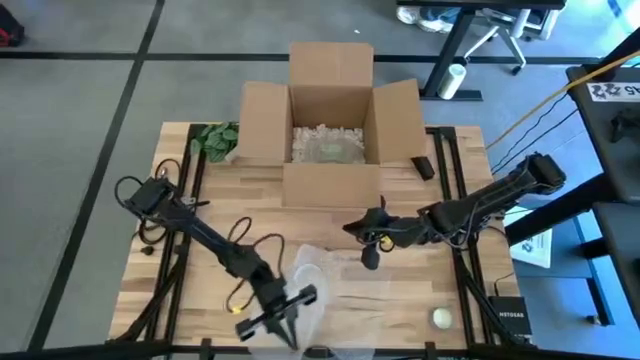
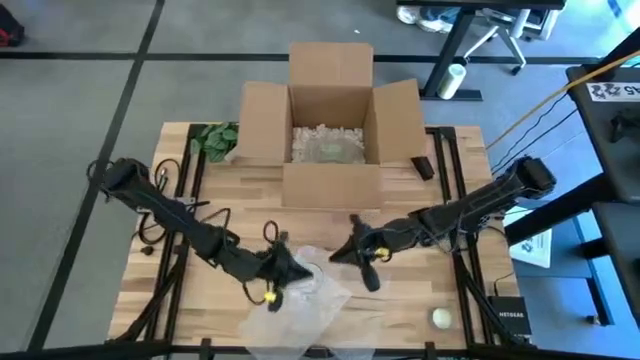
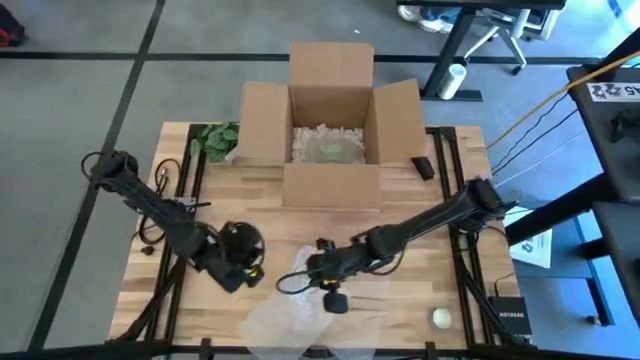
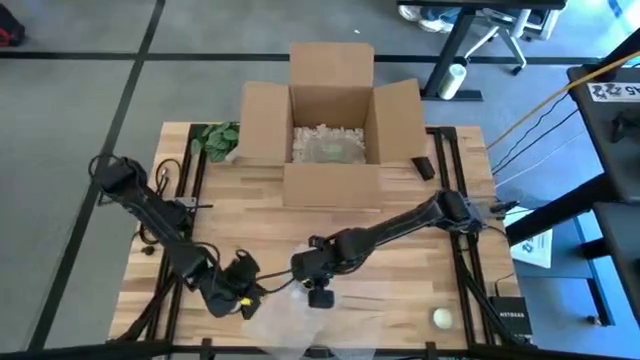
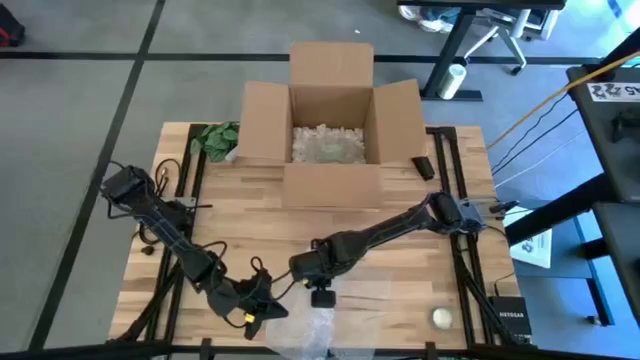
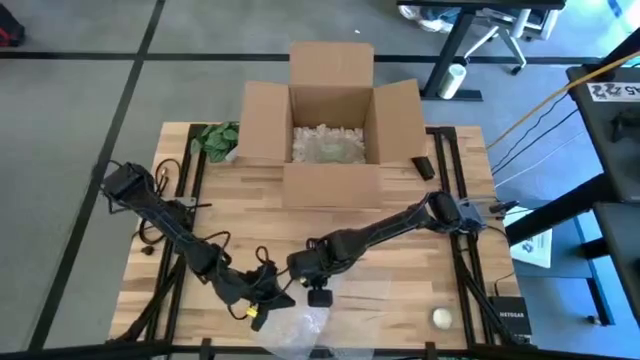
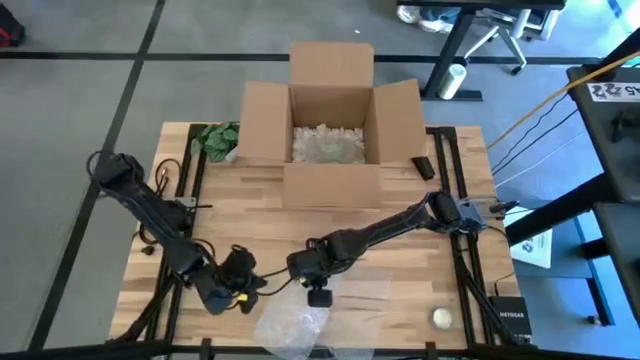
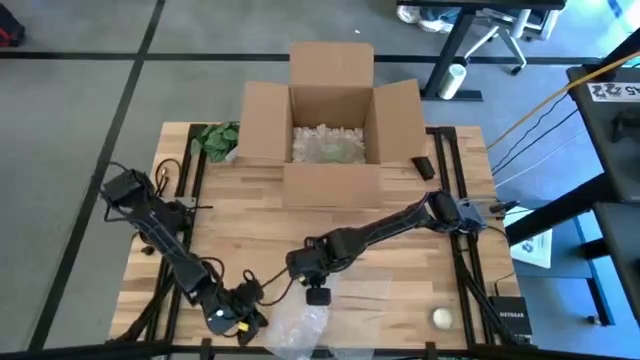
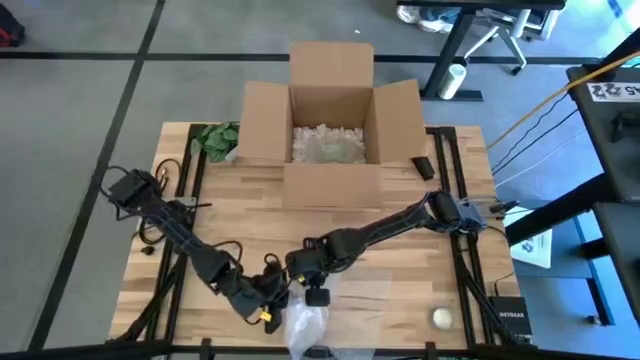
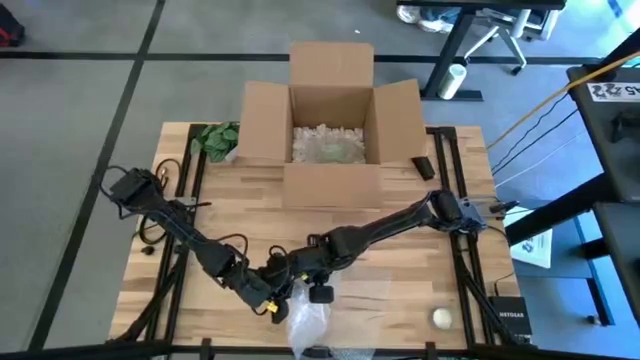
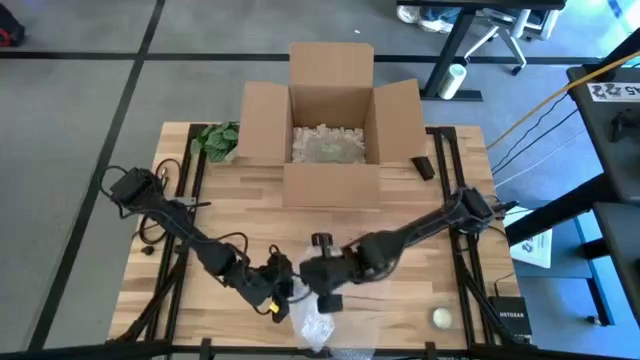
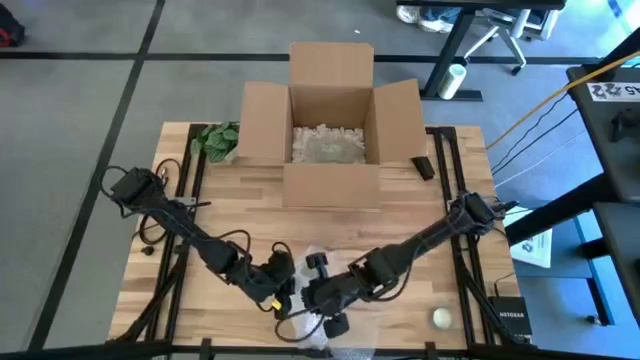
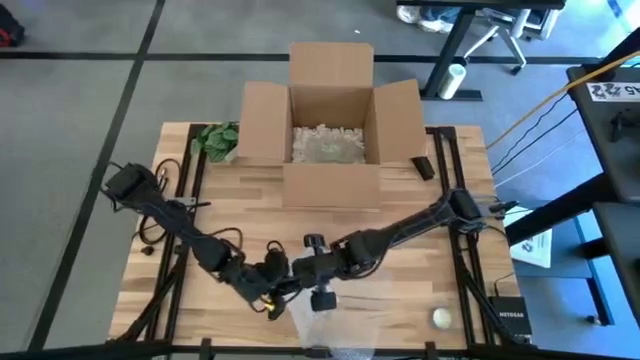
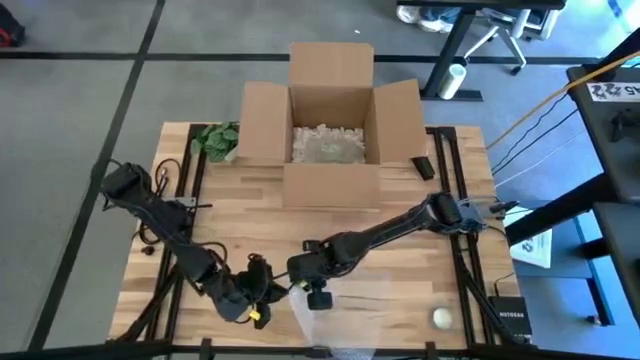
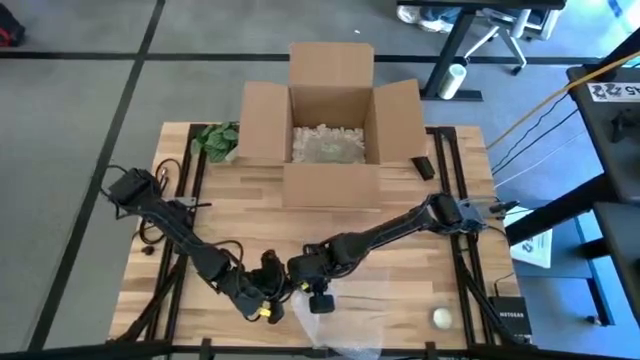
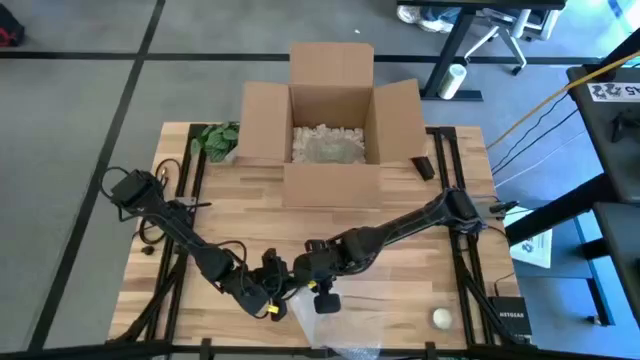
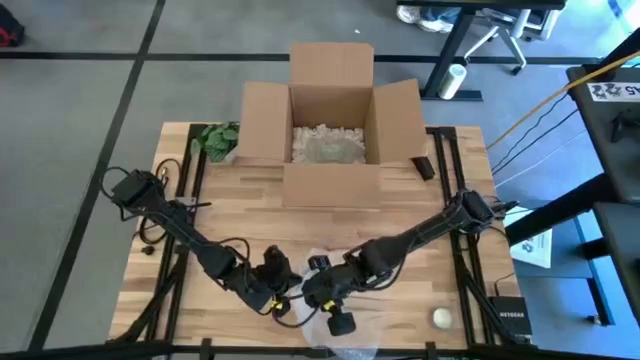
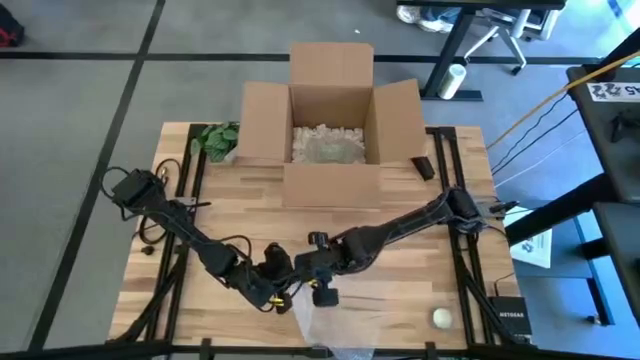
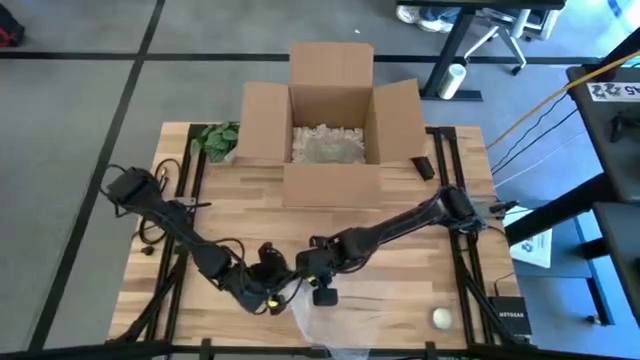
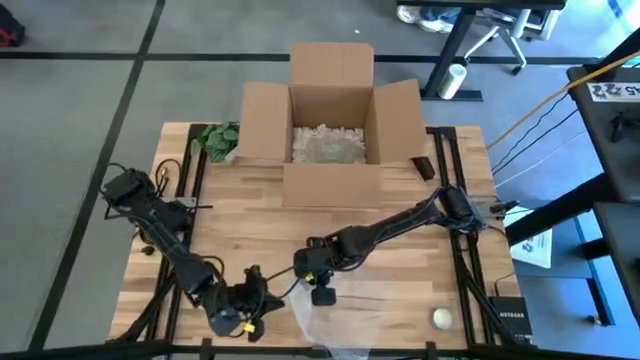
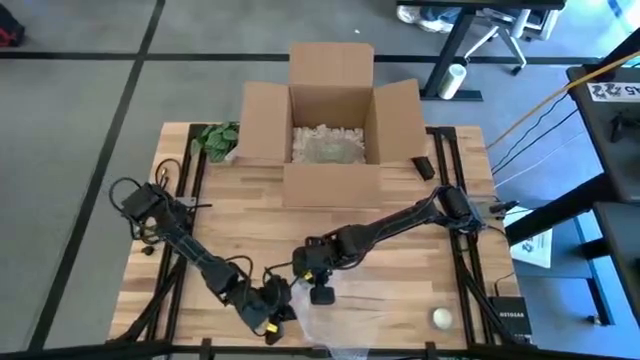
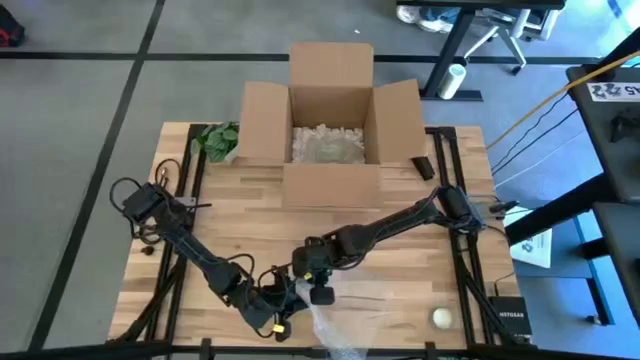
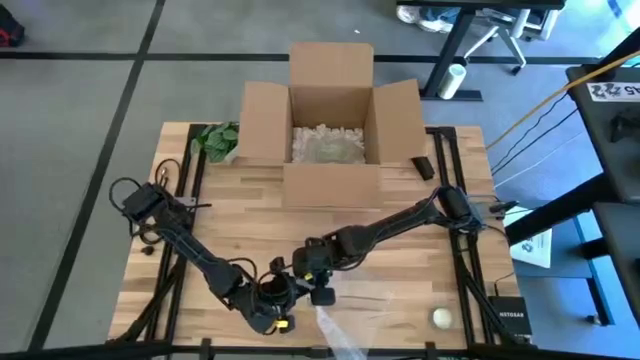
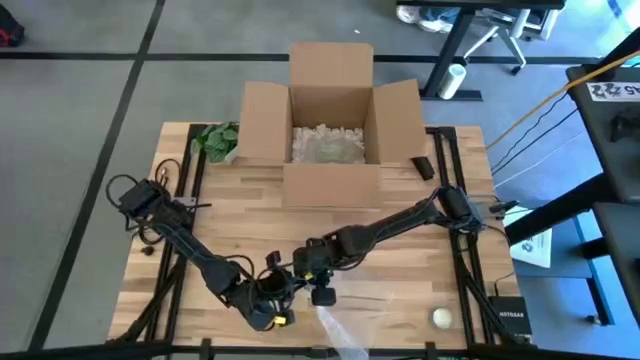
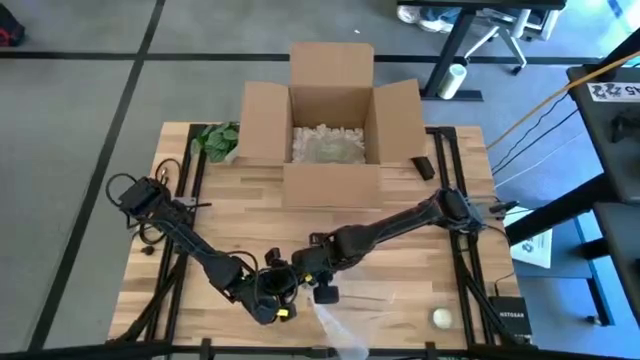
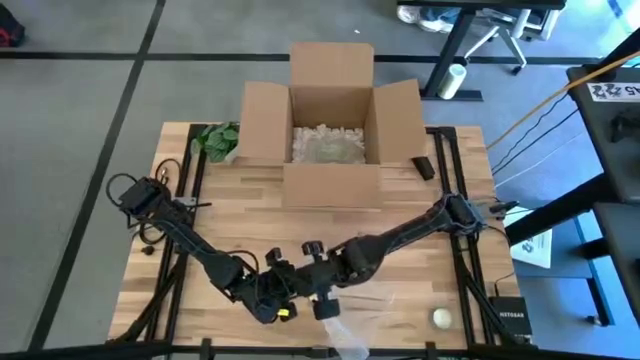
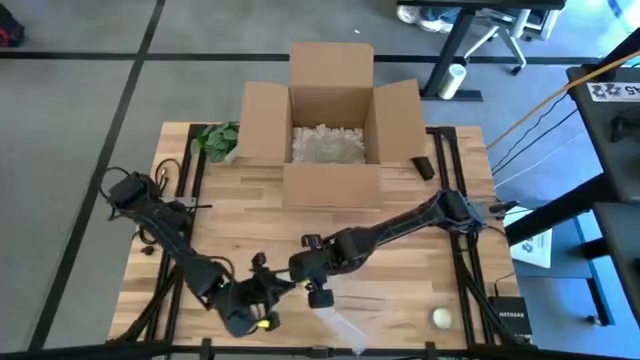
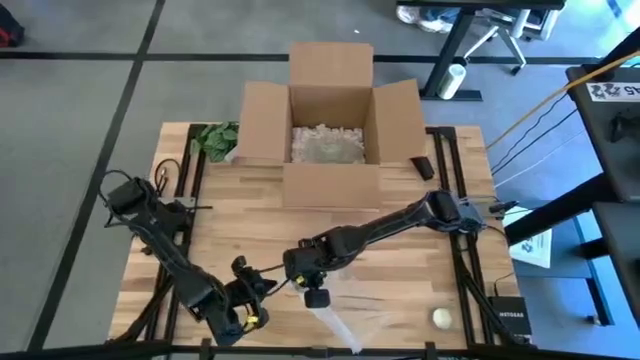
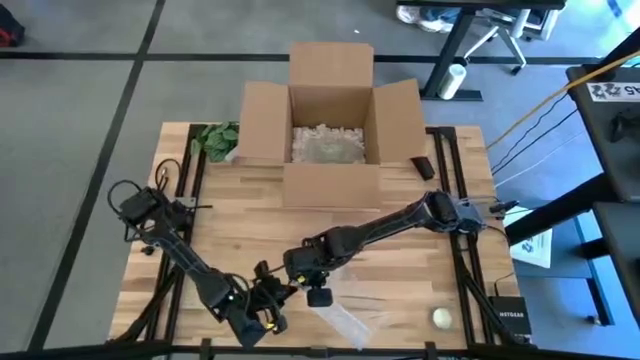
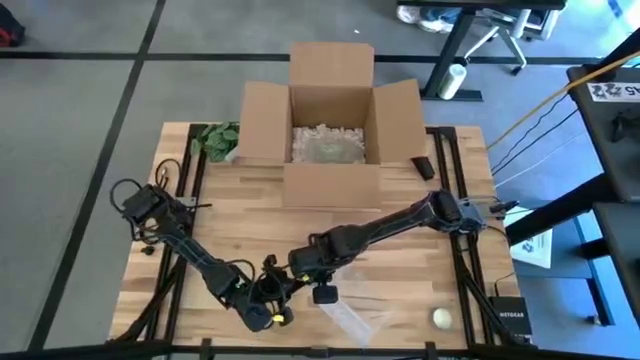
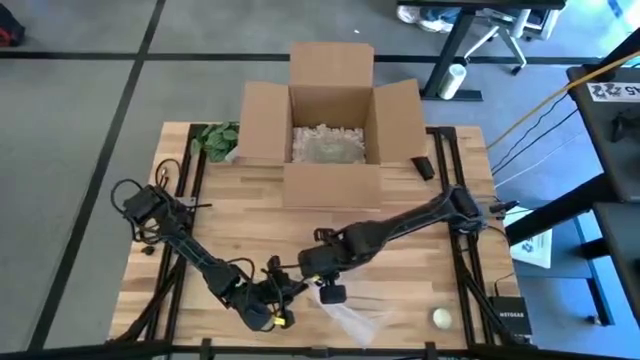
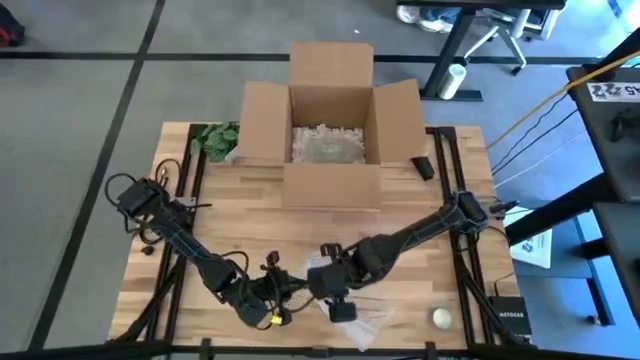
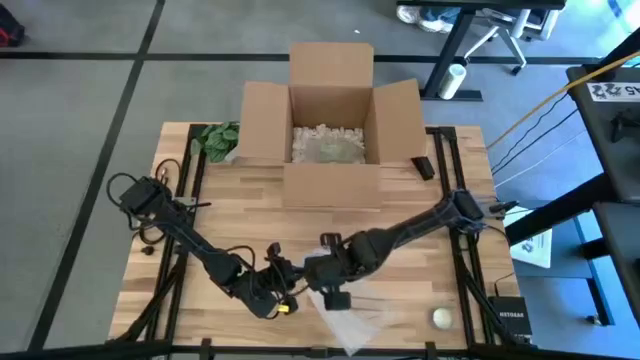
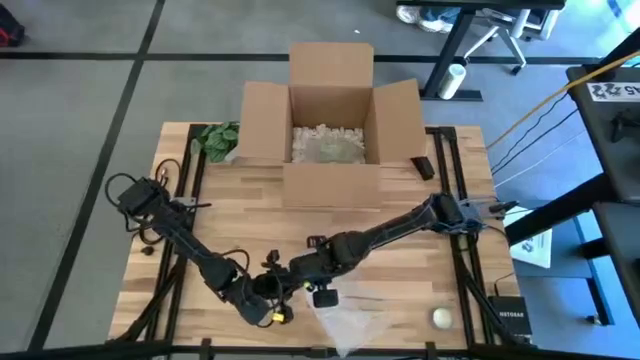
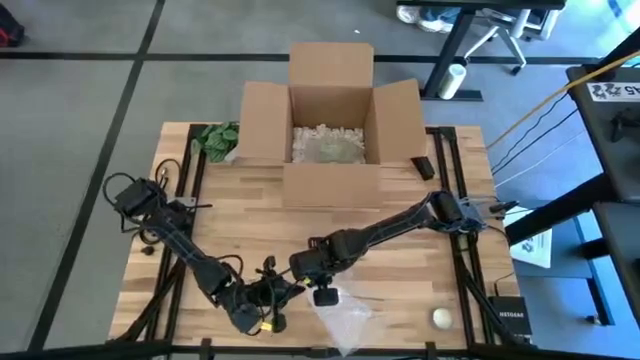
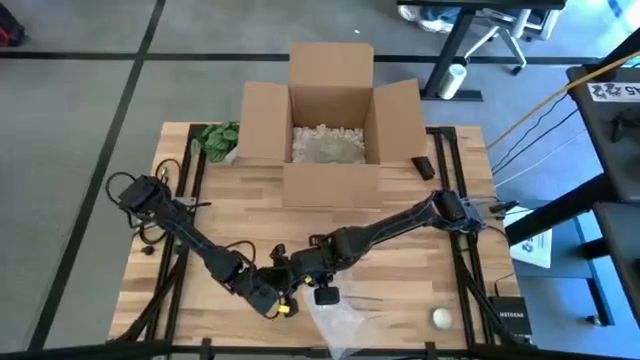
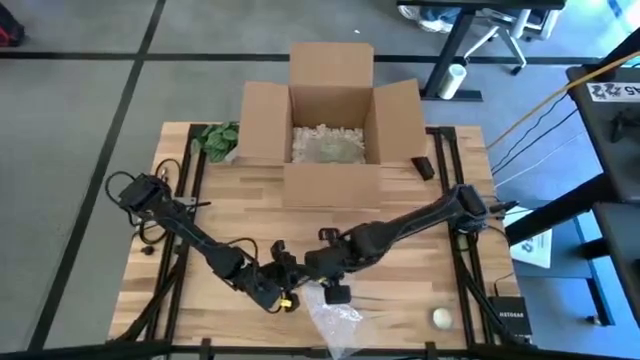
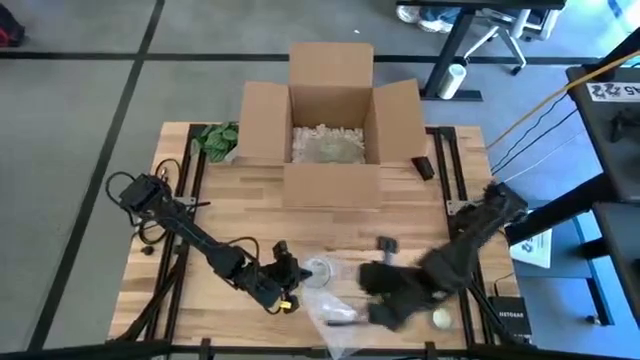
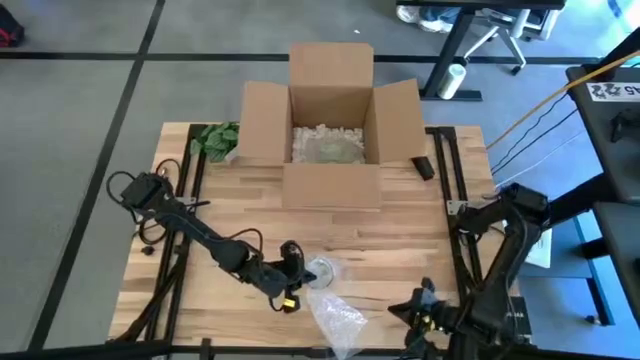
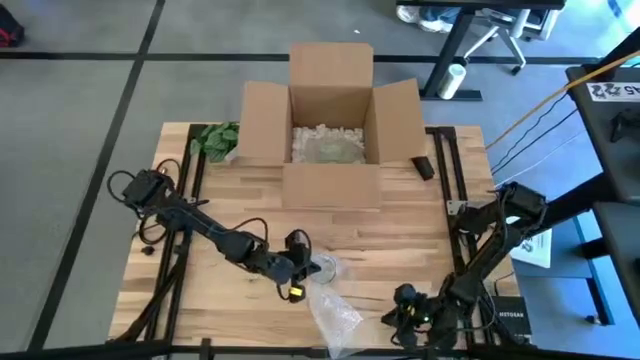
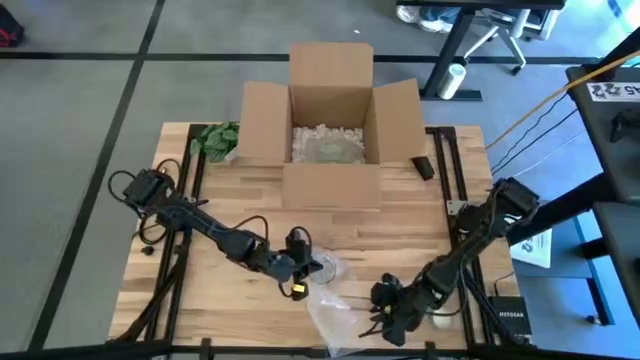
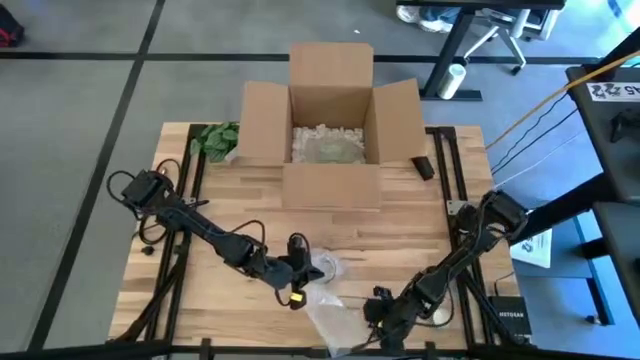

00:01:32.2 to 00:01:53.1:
Task: wrap mug
Wrap the white and blue mug with the bubble wrap

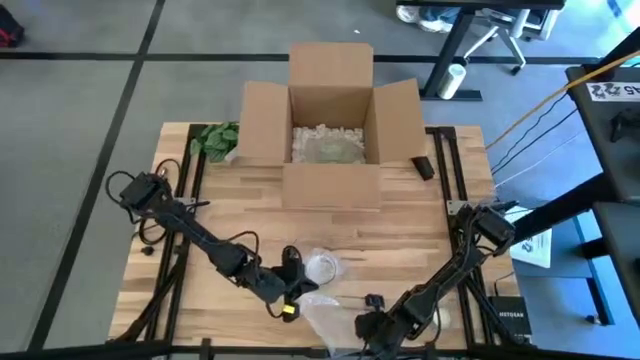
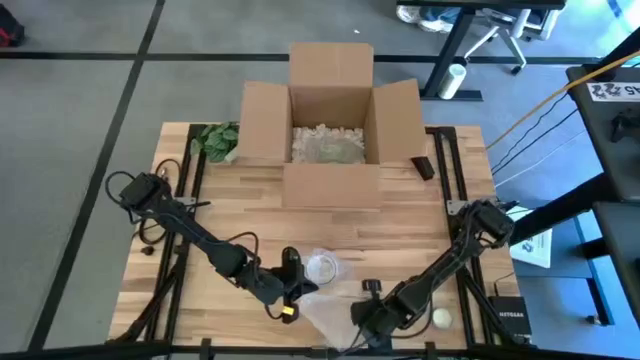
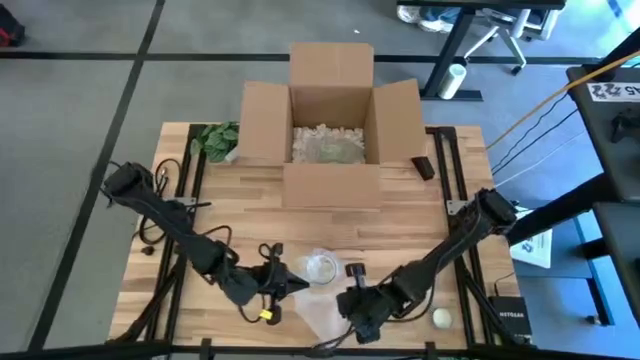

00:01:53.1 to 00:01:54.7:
Wrap the white and blue mug with the bubble wrap
